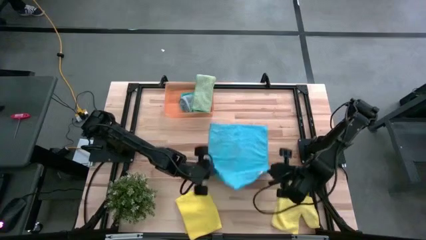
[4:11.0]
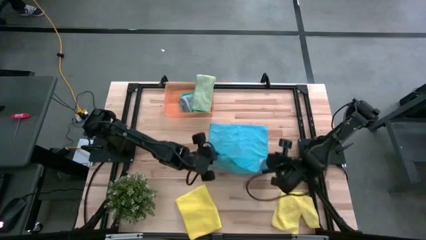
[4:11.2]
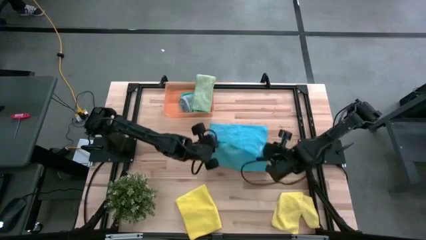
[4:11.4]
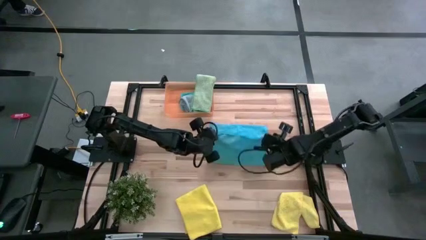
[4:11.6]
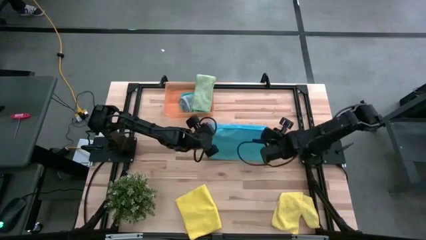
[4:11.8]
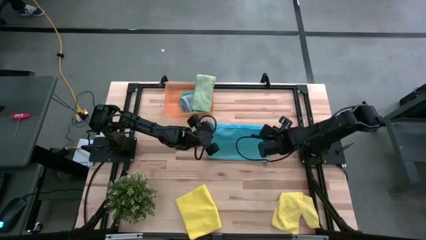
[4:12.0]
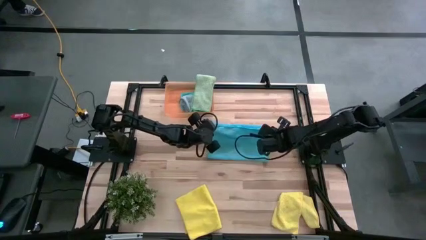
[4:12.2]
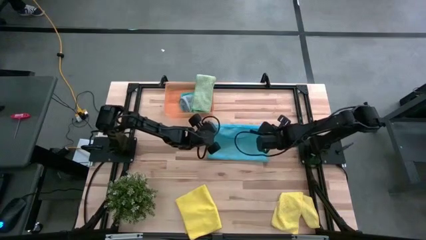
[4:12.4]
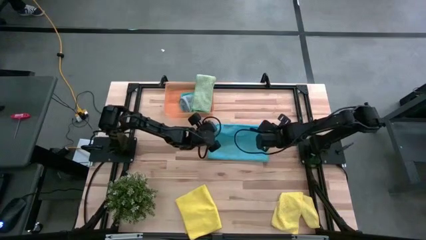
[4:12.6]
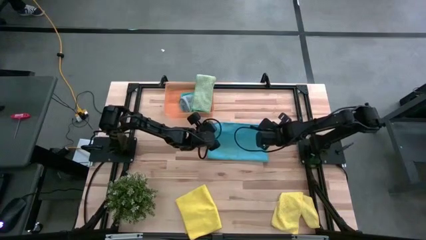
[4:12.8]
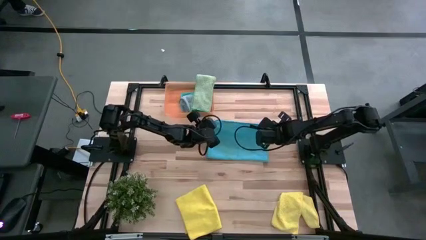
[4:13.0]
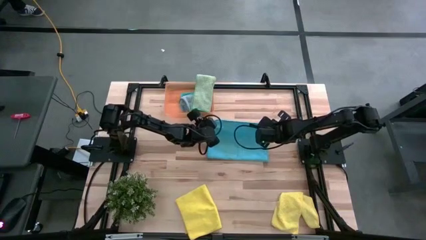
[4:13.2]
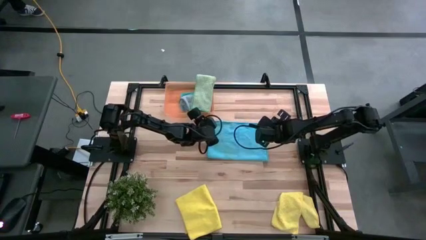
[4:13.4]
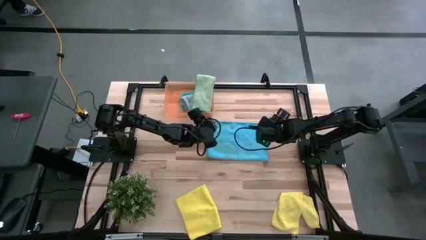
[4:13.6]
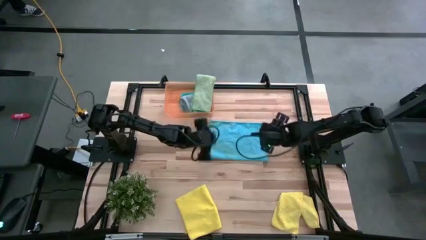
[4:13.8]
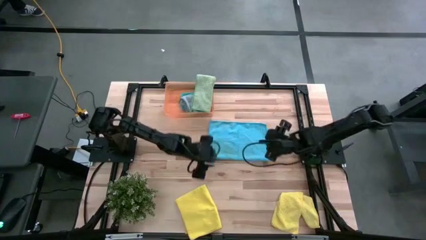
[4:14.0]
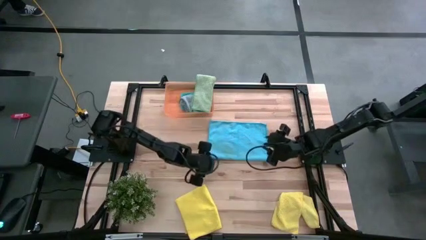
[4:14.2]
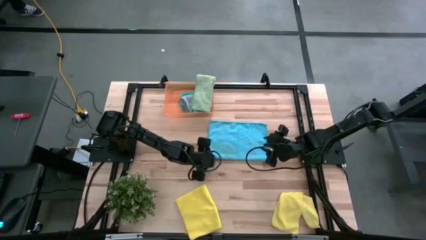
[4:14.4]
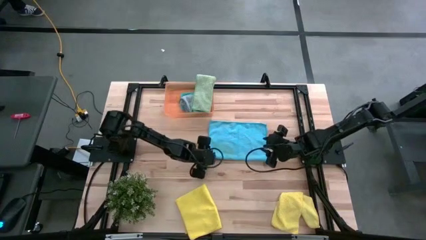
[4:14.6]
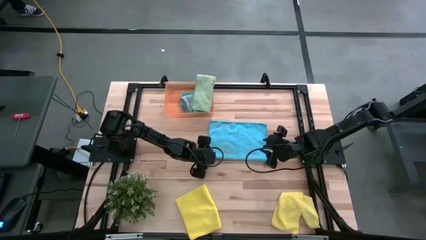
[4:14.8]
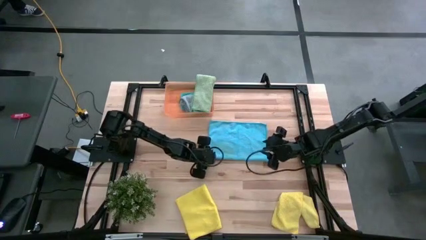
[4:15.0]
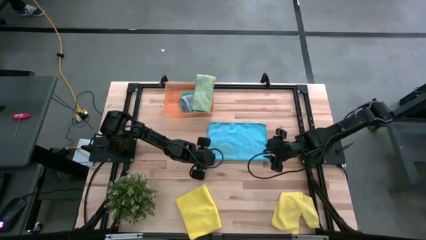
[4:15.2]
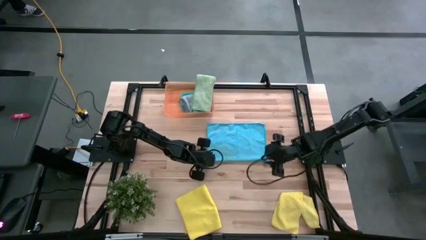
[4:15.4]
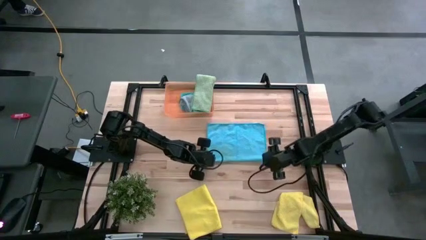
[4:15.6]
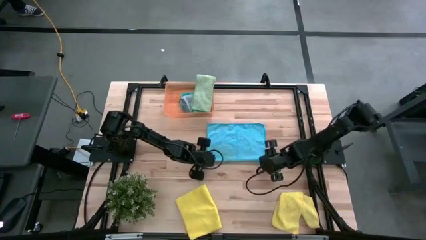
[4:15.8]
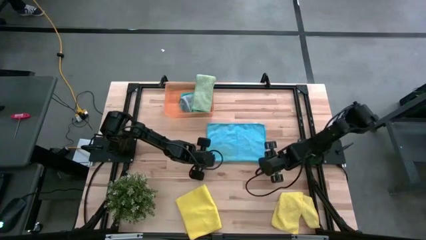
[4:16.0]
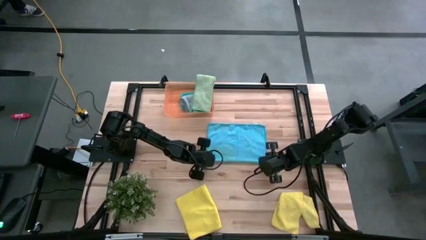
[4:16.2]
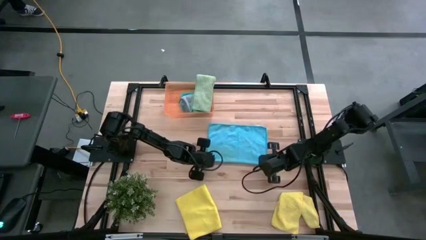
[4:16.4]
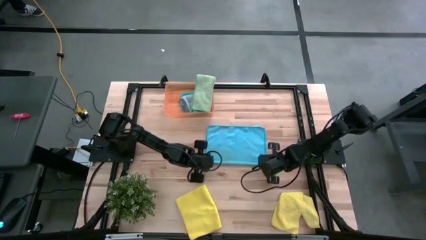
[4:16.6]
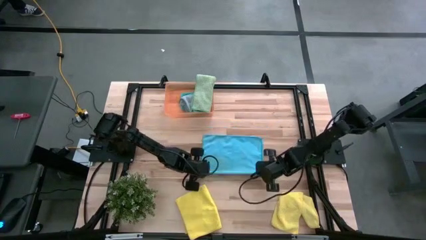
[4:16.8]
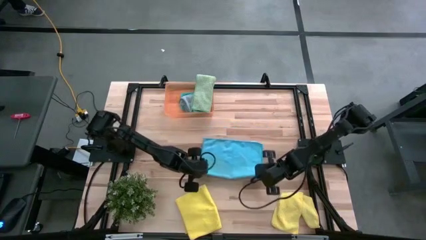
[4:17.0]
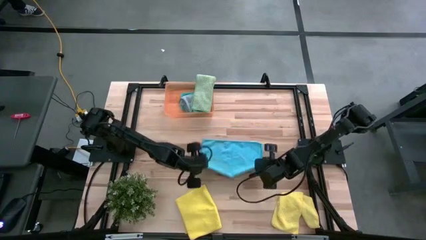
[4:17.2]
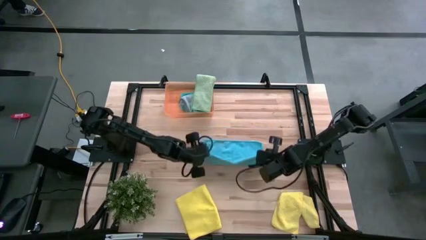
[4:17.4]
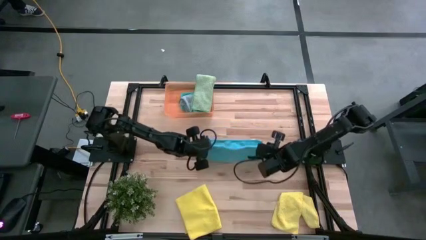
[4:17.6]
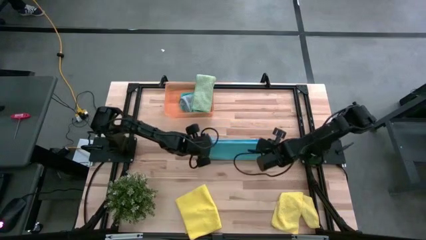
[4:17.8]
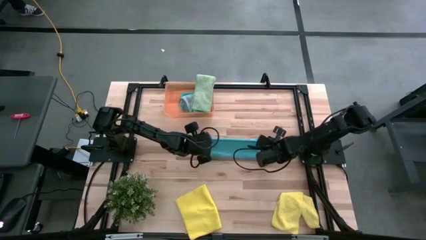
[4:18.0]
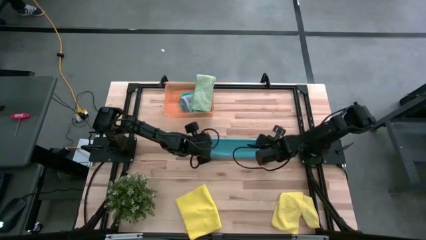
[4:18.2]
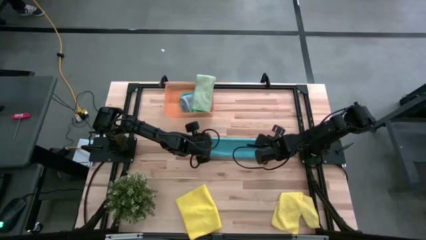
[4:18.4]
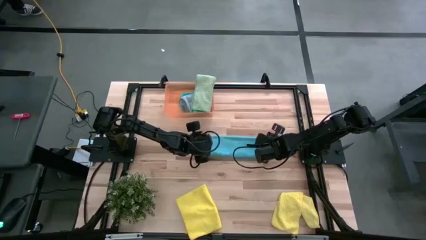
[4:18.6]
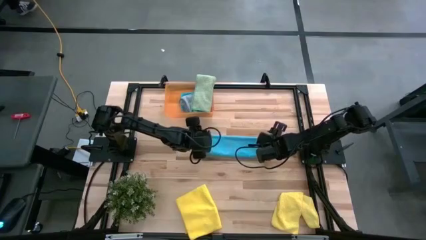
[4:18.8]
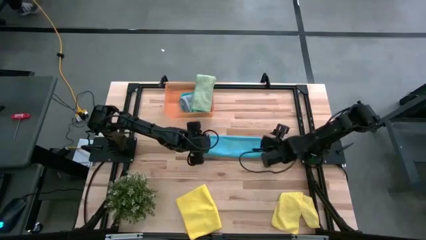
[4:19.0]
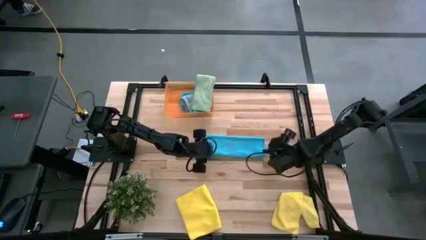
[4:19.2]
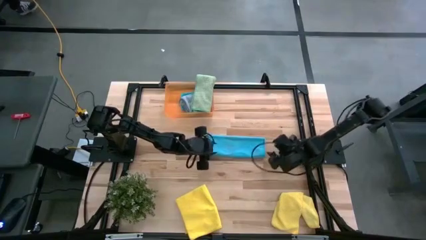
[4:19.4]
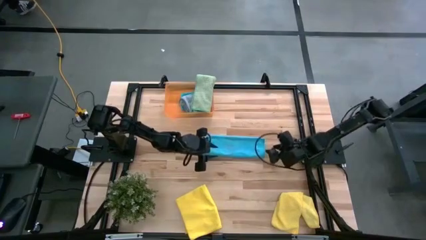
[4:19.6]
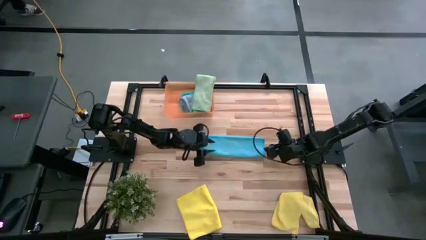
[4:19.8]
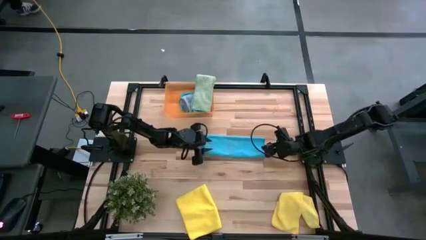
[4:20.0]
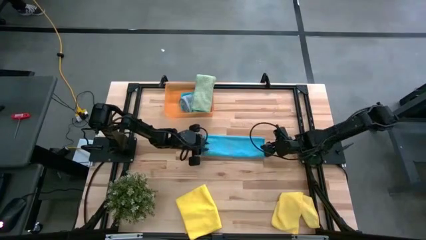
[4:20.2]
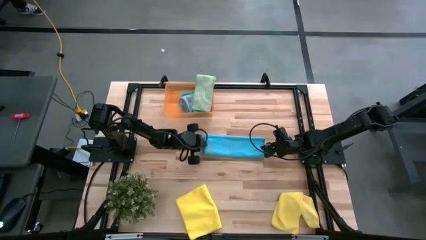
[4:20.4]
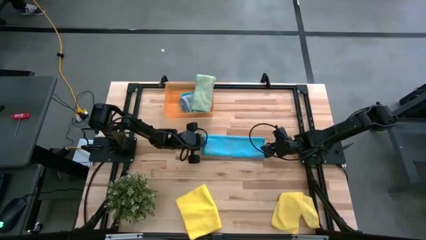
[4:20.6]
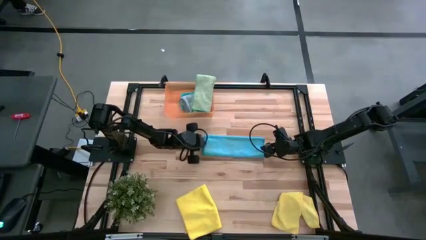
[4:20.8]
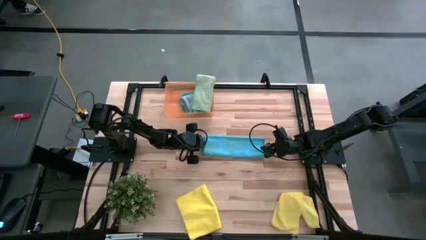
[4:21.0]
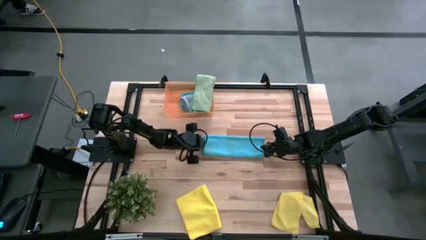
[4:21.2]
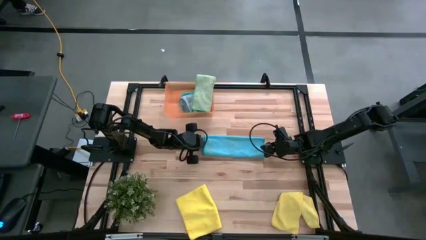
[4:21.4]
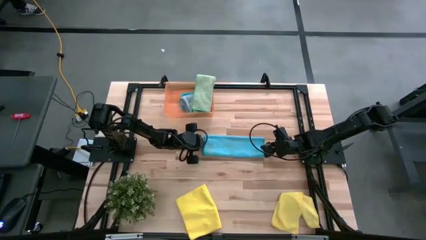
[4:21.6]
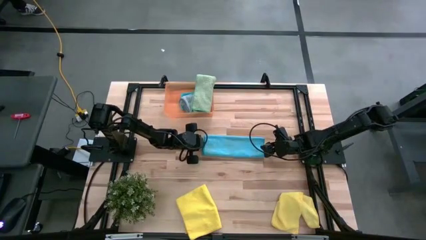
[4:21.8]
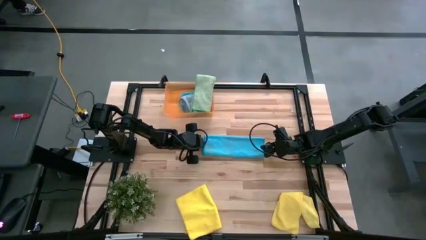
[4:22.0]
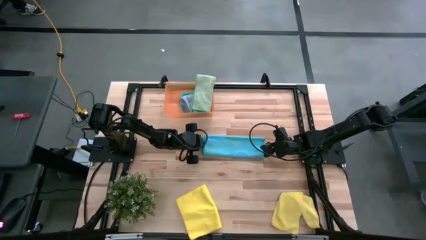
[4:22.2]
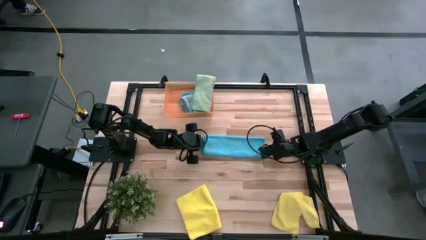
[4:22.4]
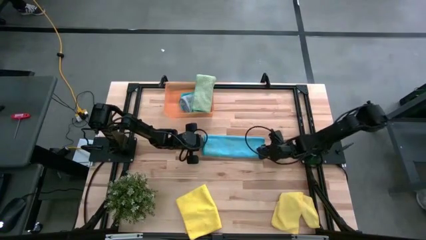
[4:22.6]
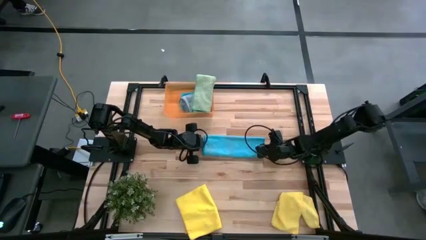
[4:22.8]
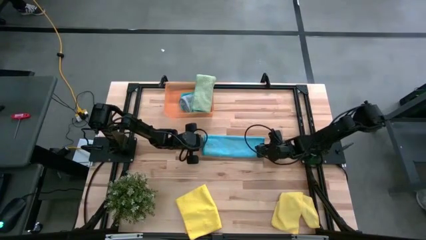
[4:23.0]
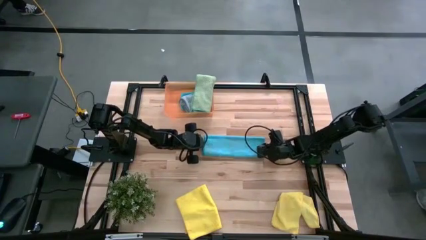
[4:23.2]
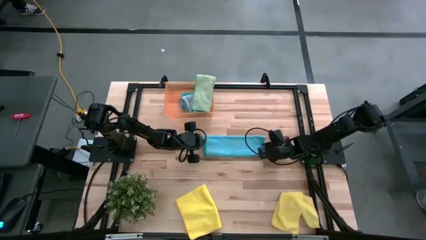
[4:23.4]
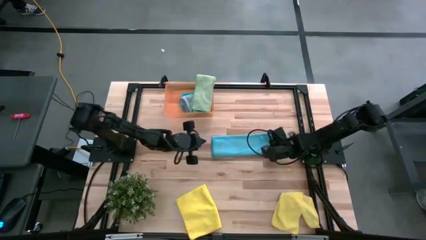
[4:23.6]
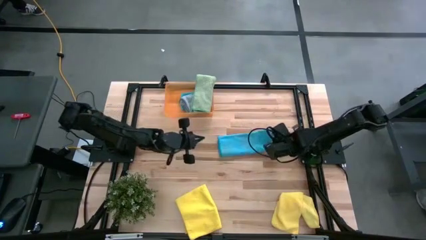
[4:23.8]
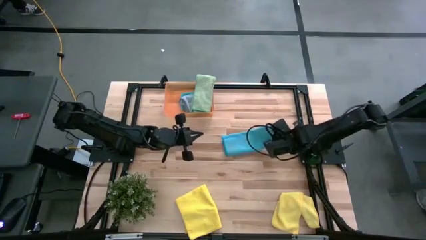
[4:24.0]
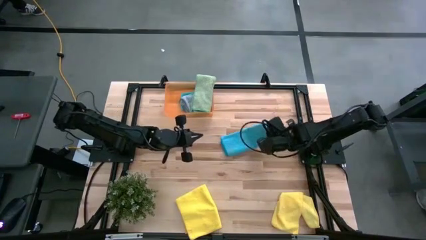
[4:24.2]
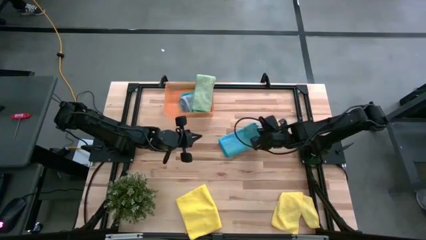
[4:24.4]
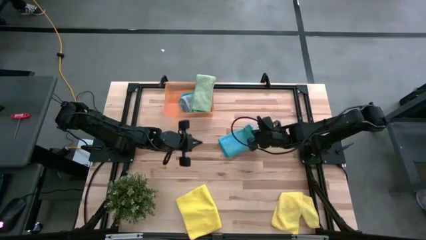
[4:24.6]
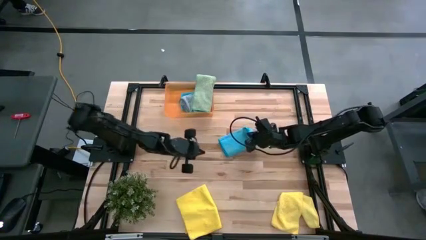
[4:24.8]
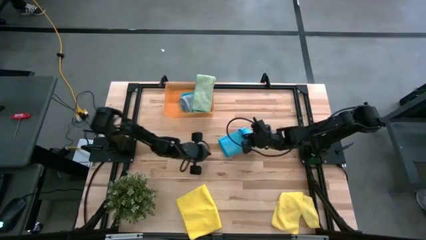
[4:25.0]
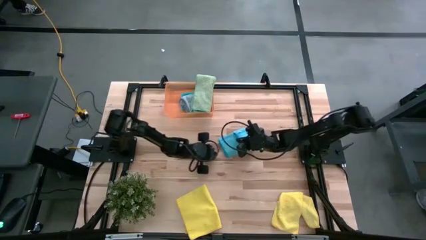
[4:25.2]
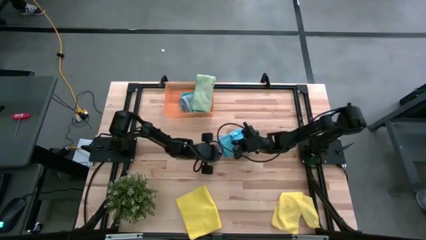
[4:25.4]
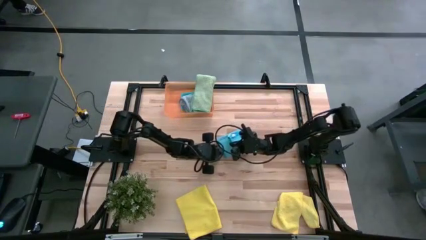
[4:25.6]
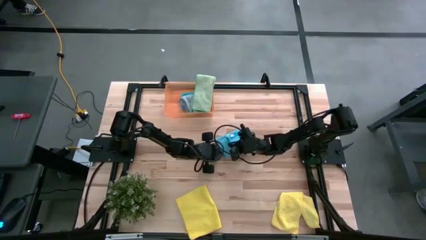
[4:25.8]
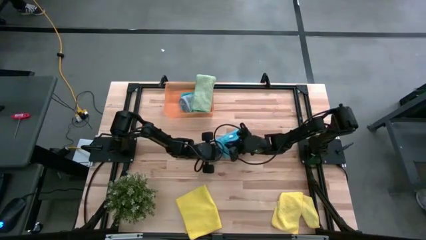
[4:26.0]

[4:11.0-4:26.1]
Task: Fold microfiber towels
Fold the blue microfiber cloth on the table
